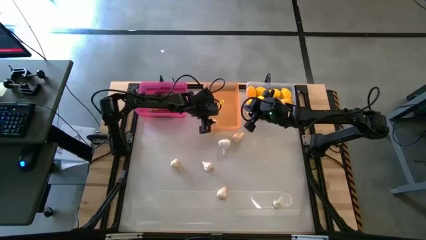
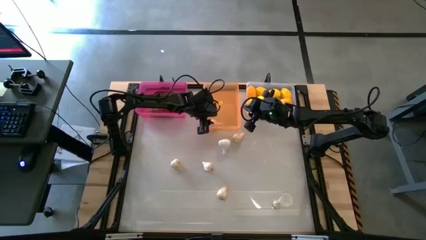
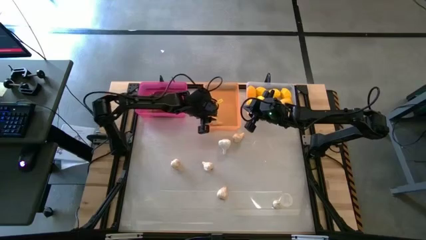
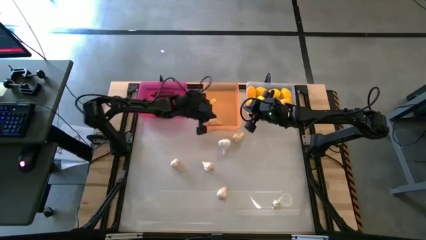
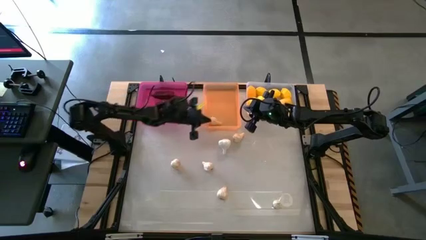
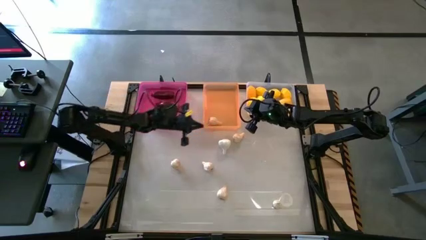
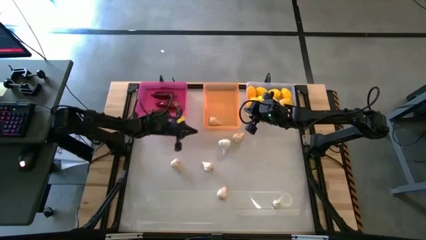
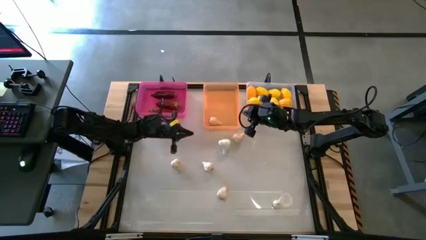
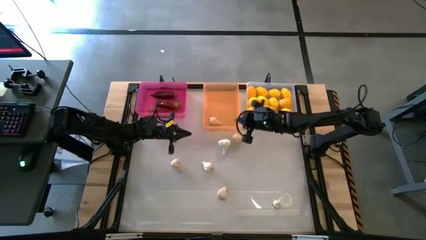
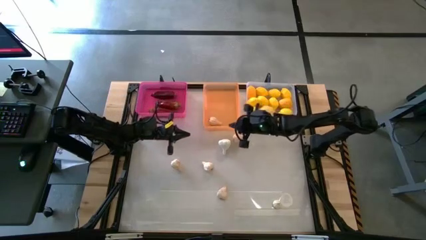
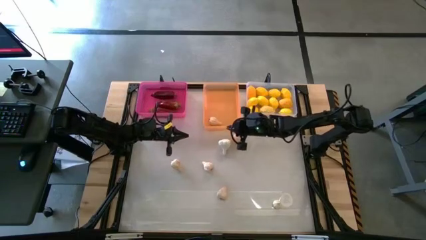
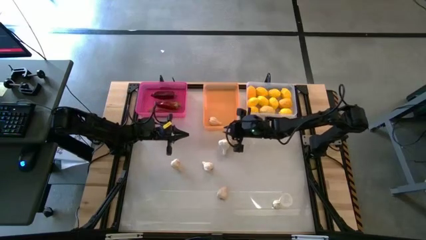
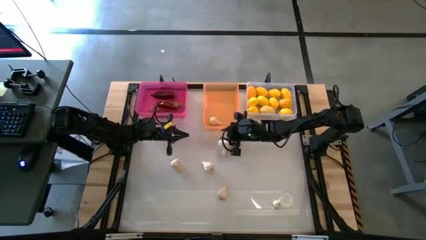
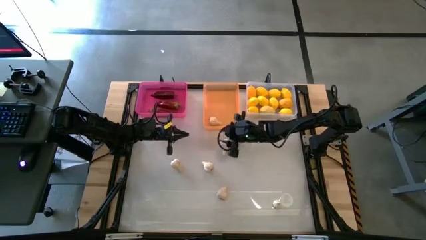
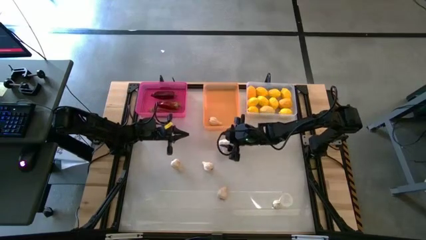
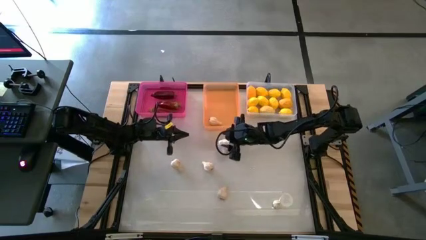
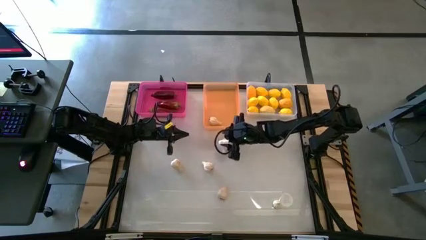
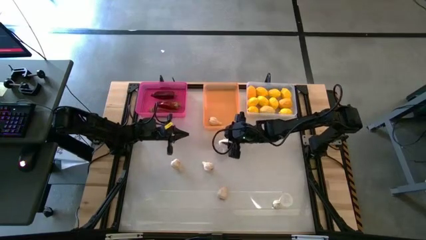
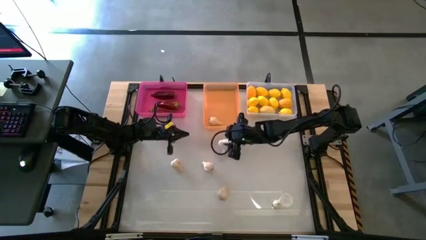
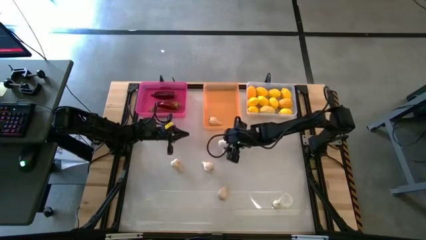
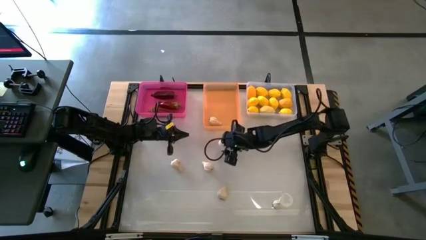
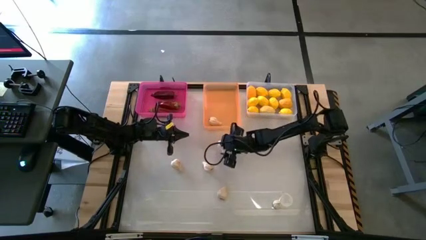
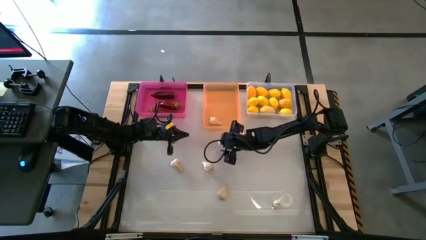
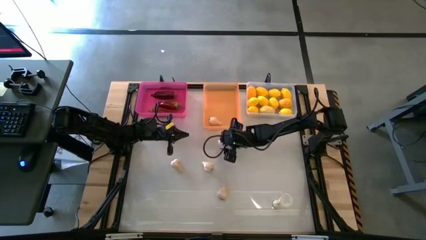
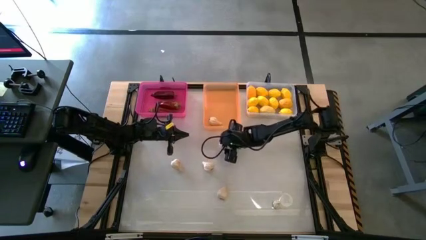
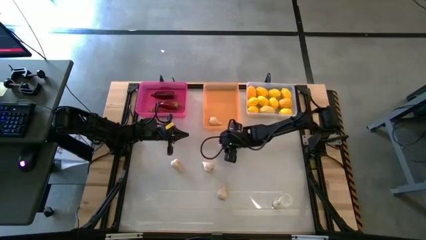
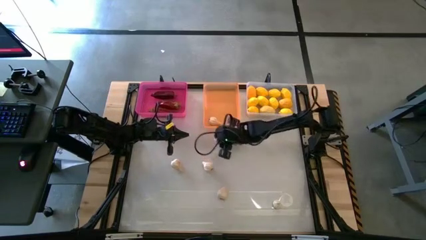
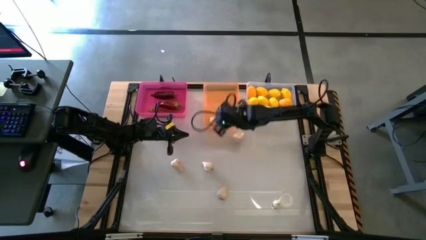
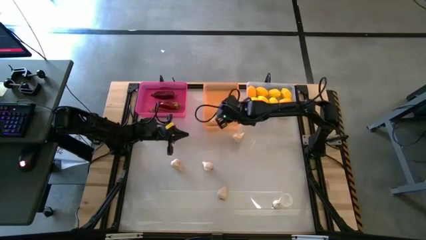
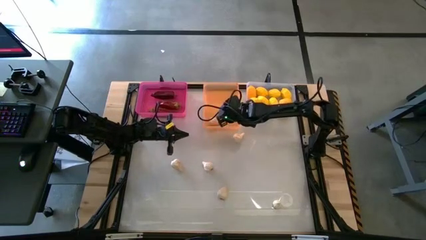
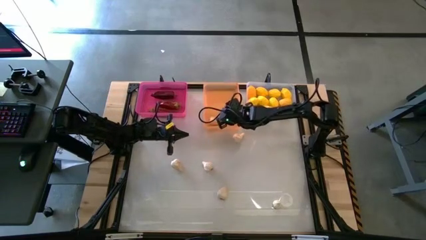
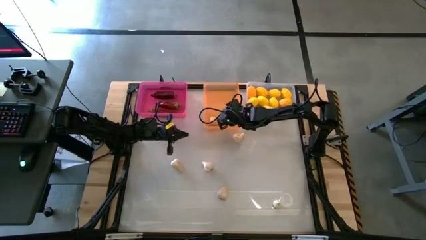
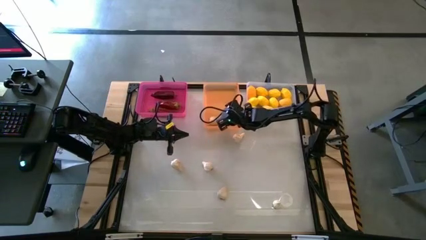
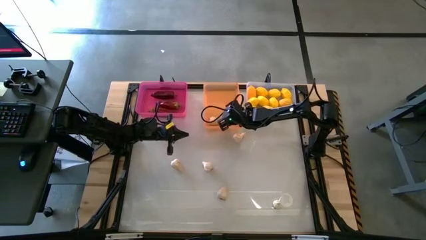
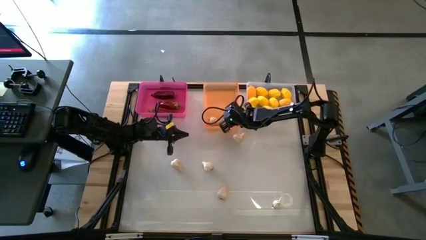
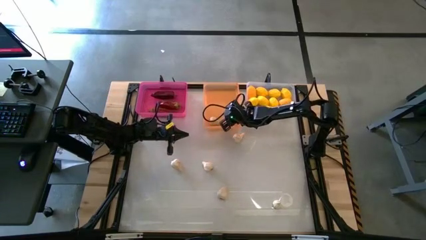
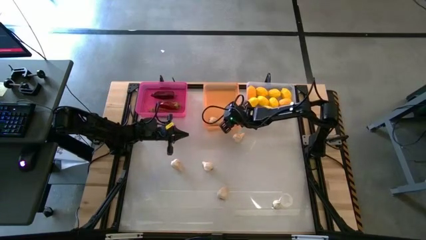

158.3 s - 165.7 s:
Task: Sort produce into baskets
Put the white garlic into the orange bin

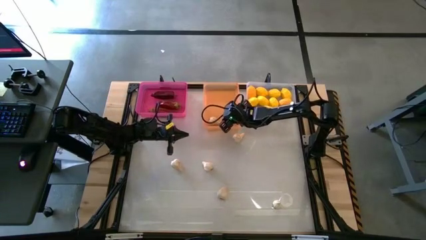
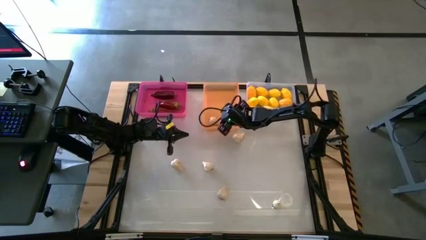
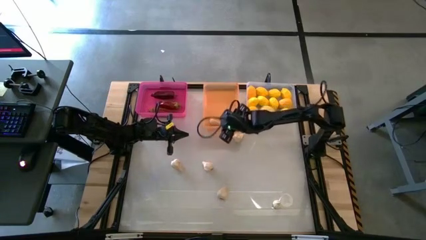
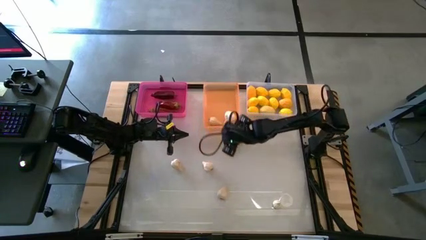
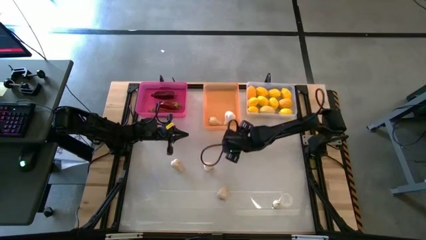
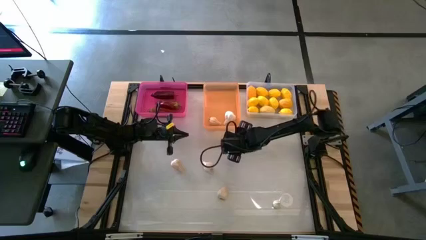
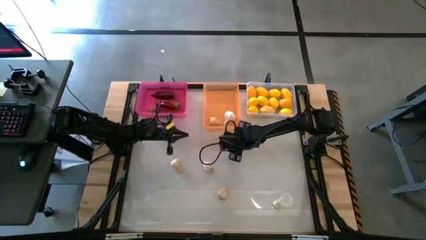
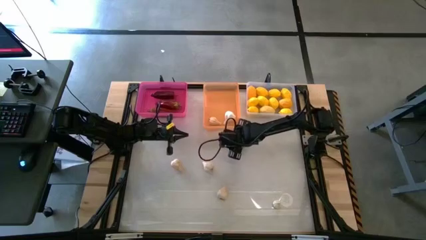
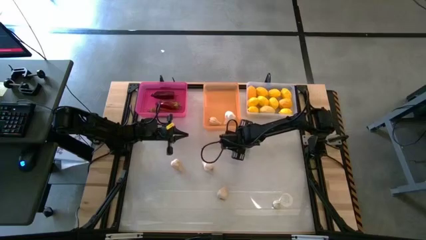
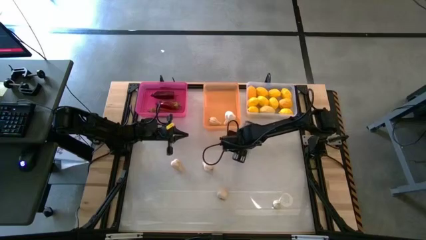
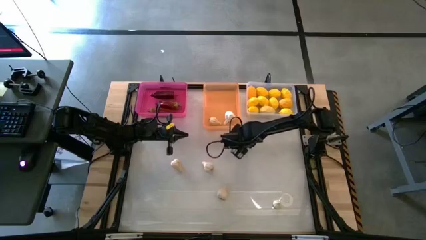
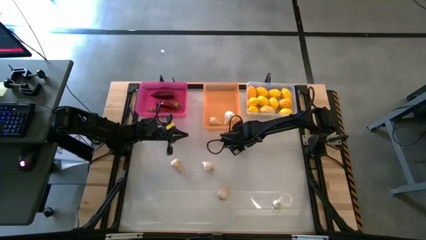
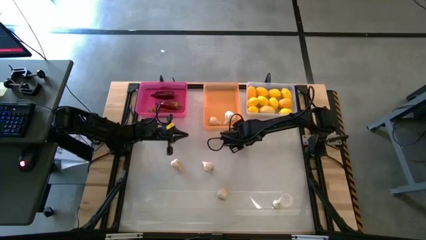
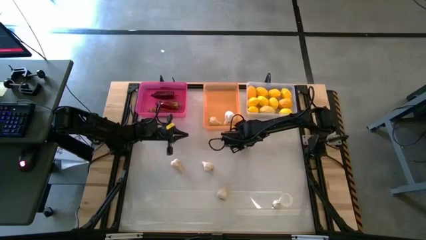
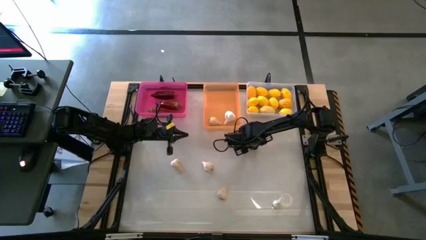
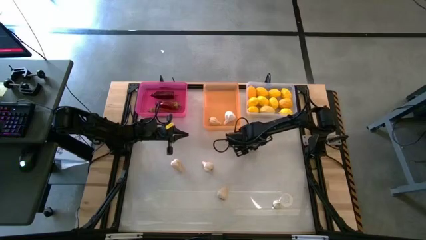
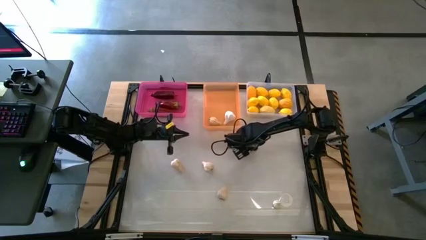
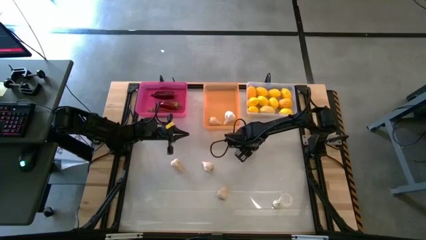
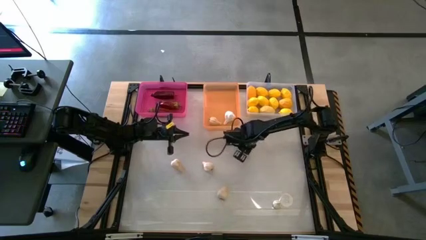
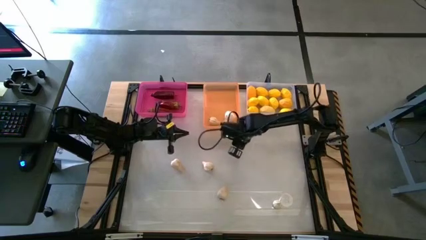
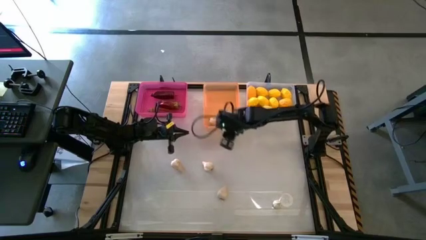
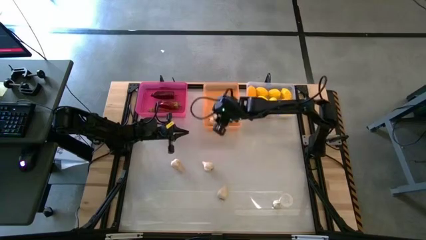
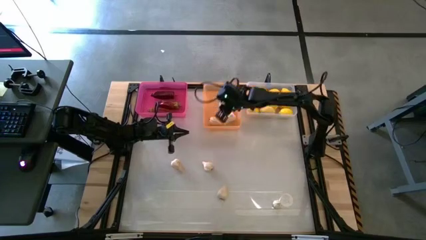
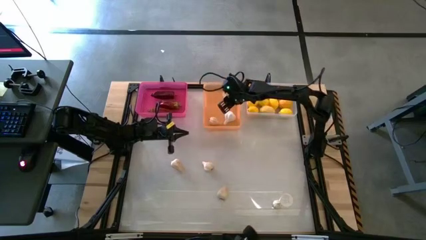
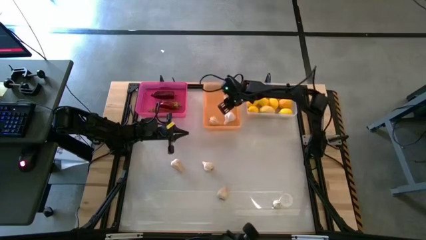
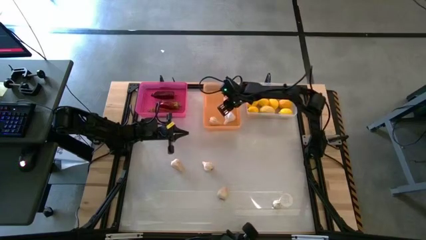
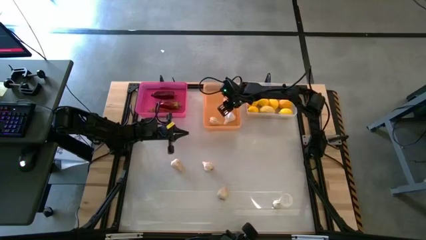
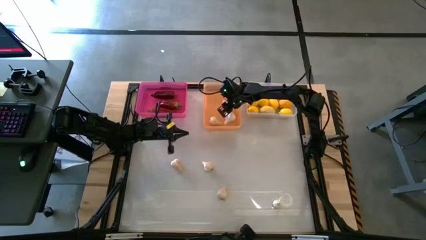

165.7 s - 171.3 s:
Put the white garlic into the orange bin

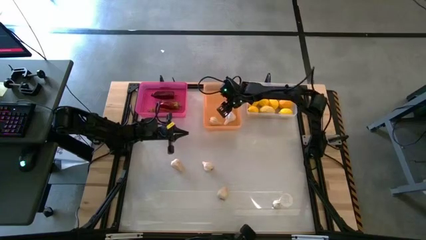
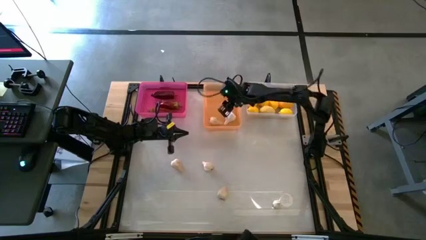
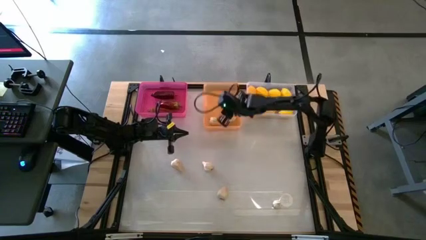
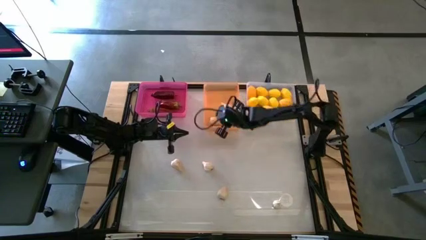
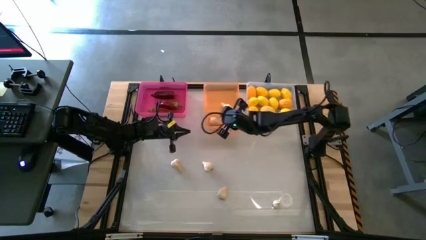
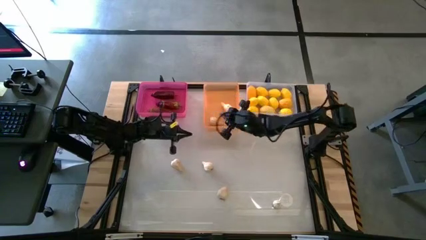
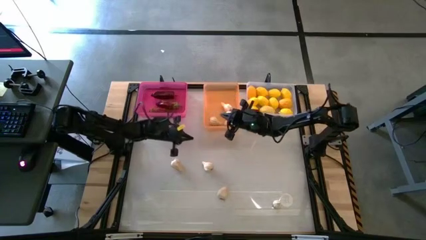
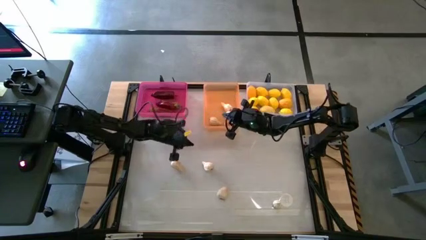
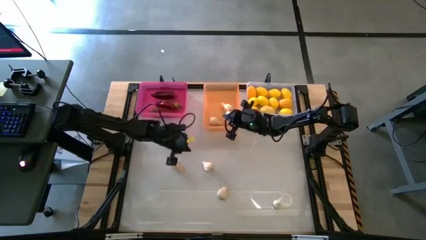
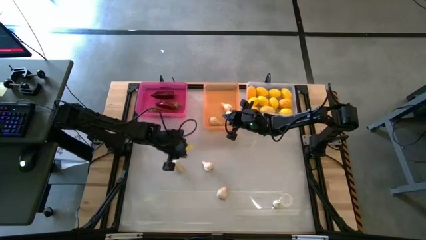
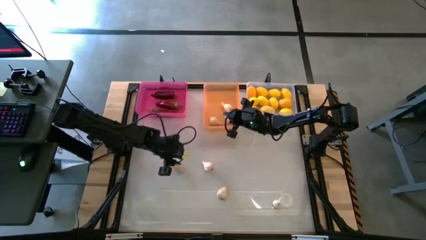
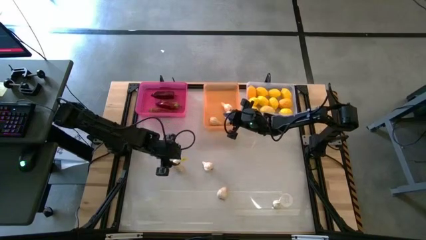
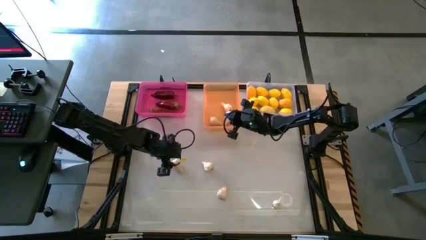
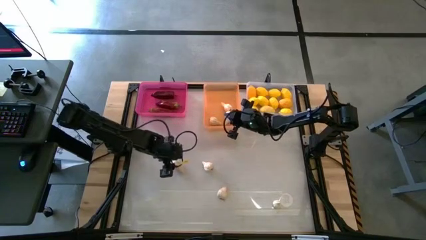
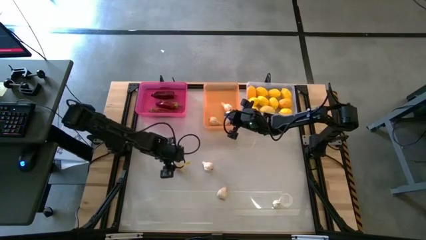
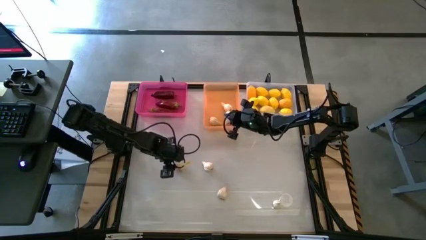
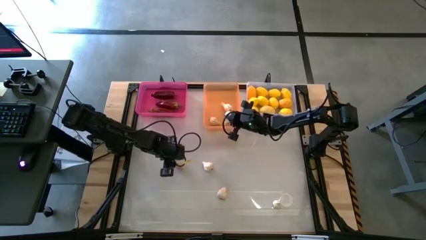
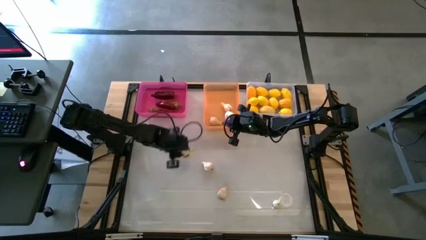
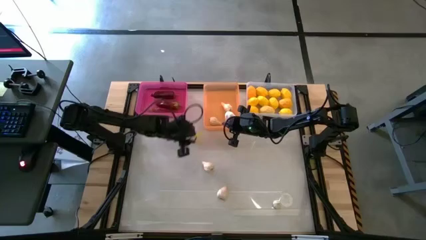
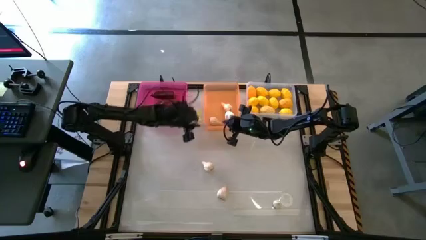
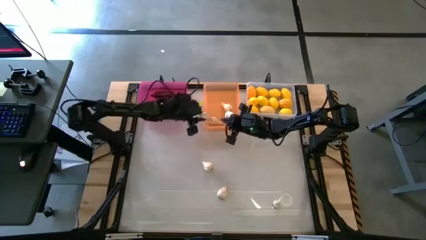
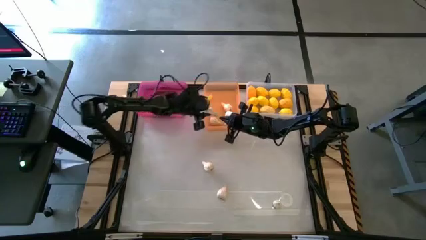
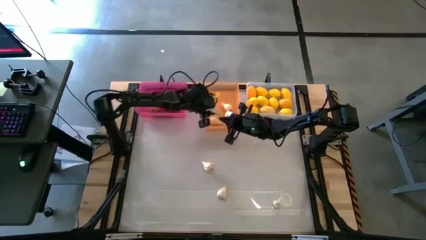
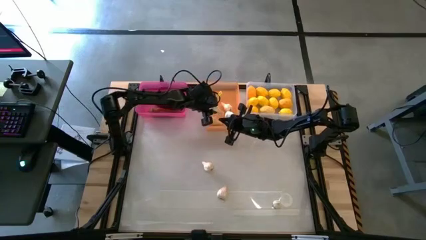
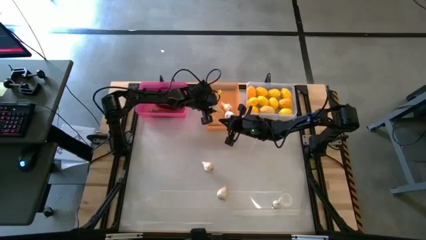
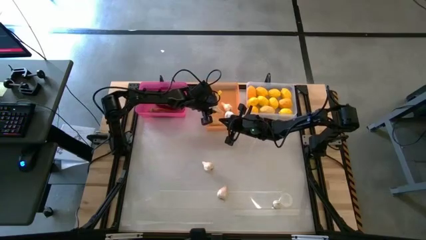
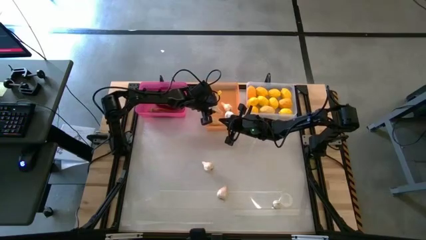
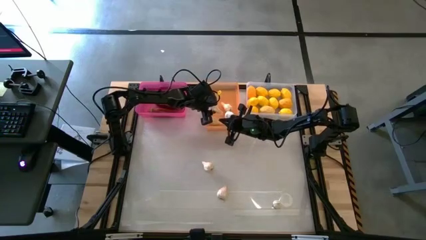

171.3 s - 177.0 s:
Put the white garlic into the orange bin
